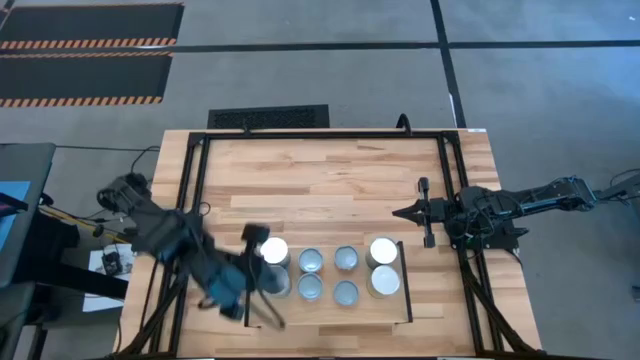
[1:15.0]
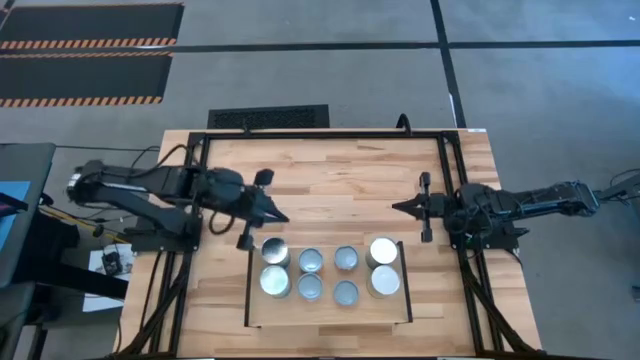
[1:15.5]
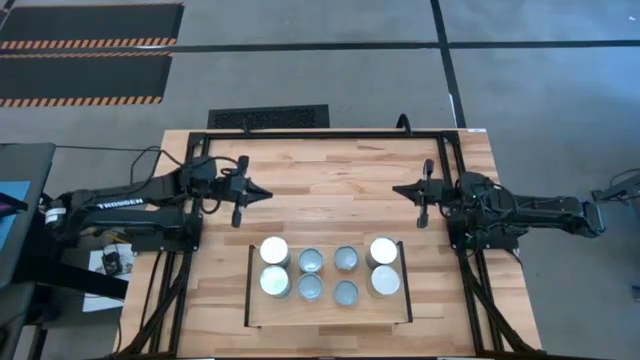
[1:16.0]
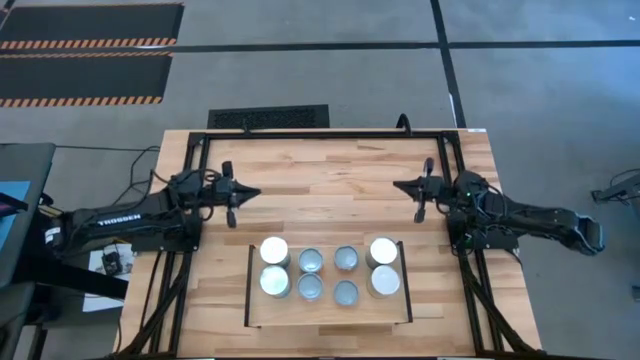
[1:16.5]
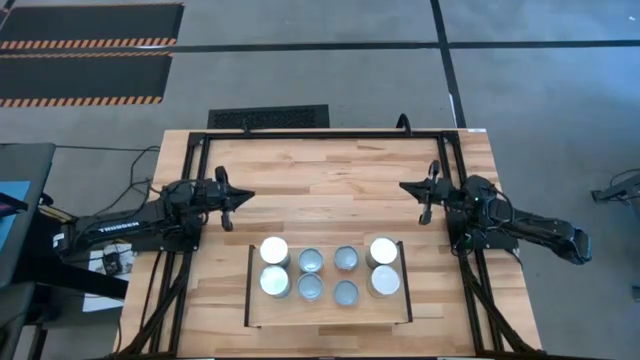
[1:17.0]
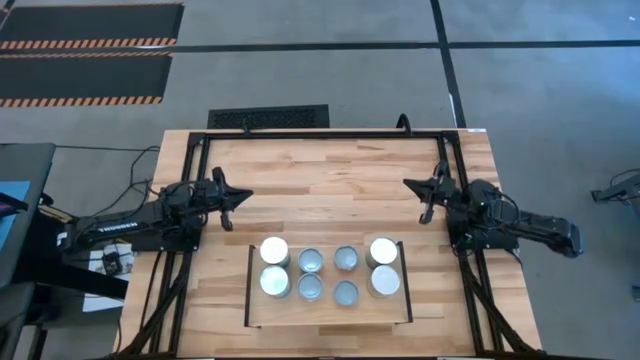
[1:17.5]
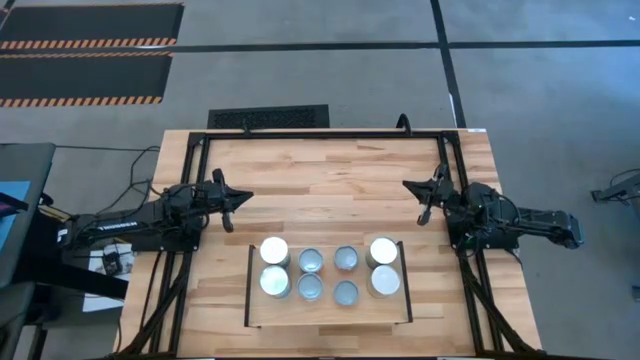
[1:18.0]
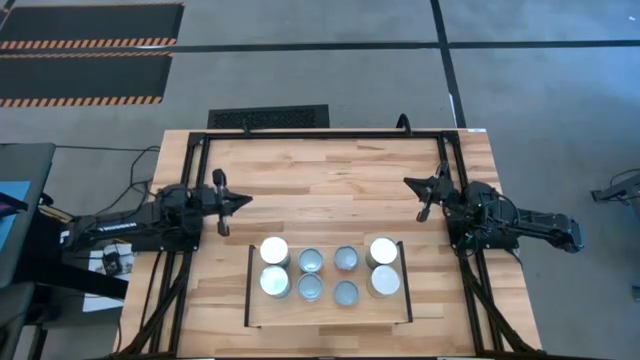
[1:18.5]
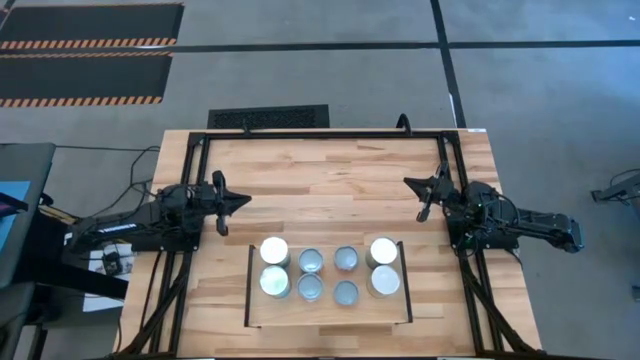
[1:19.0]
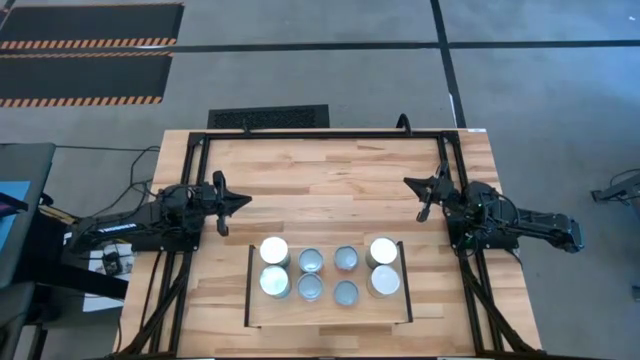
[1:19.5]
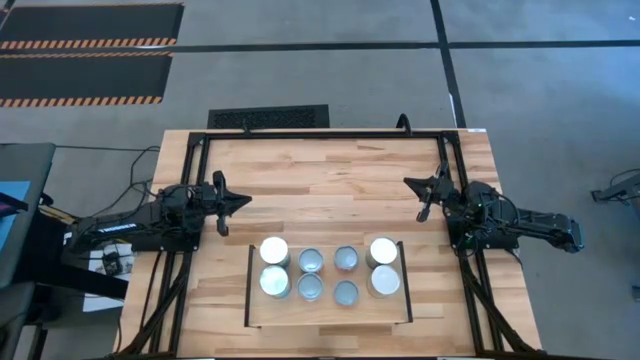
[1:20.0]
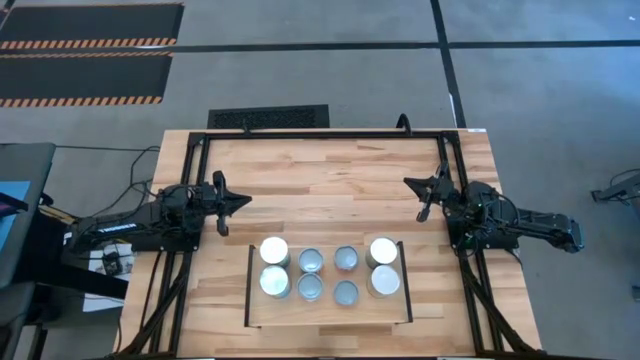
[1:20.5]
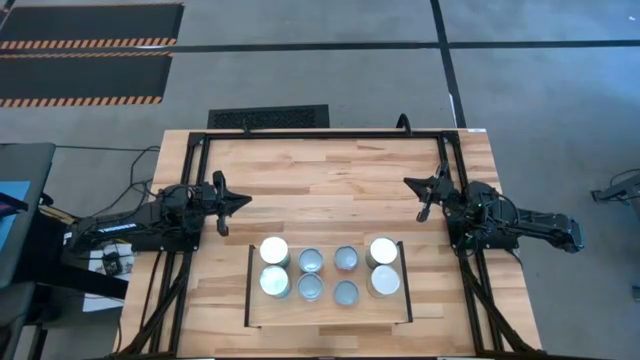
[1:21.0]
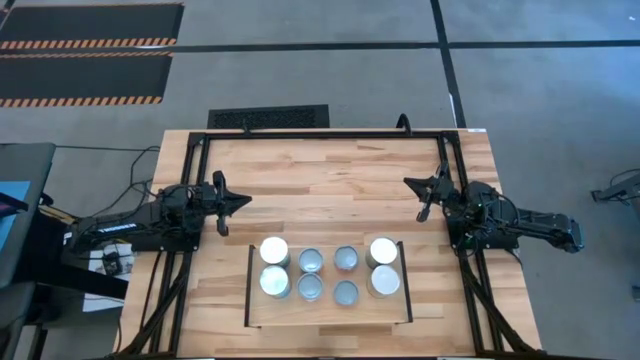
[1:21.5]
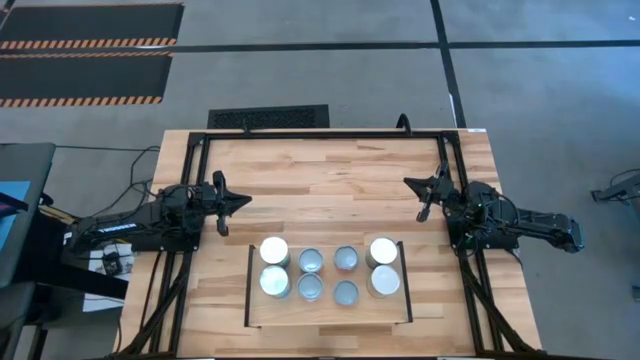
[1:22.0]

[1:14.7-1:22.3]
Task: Pick and place cans onto a shelf
Return to Home Position

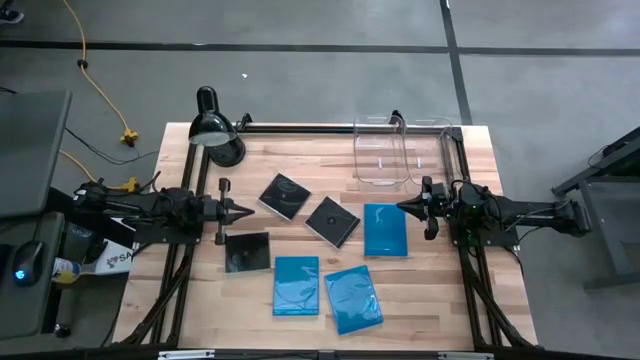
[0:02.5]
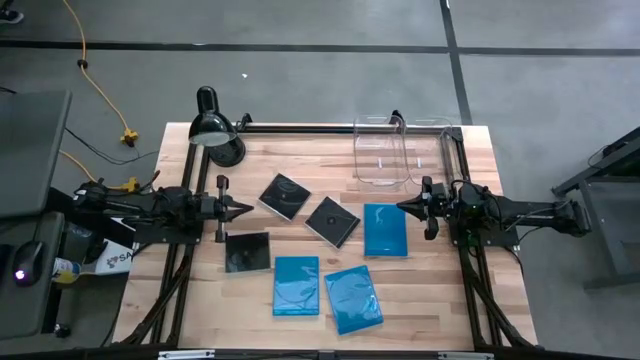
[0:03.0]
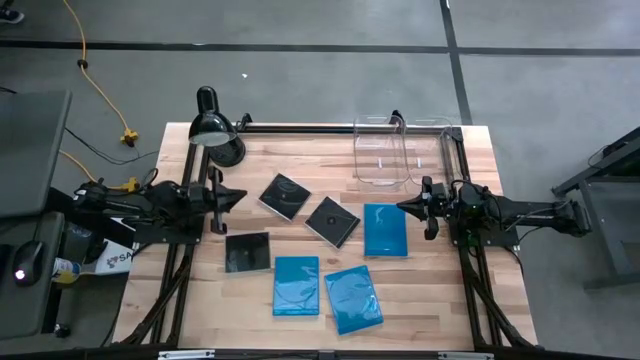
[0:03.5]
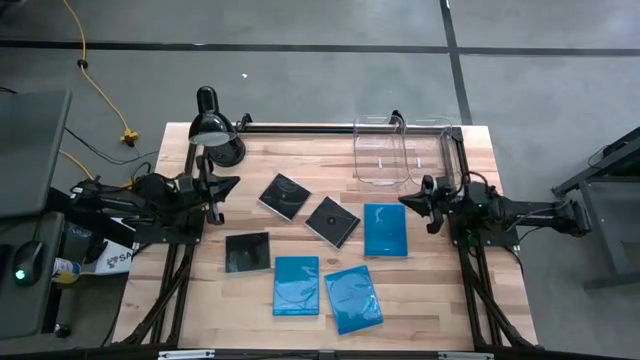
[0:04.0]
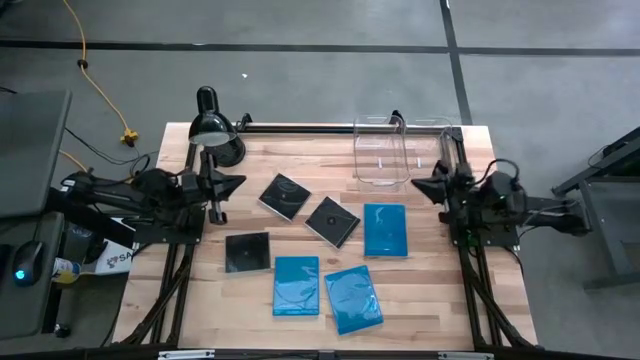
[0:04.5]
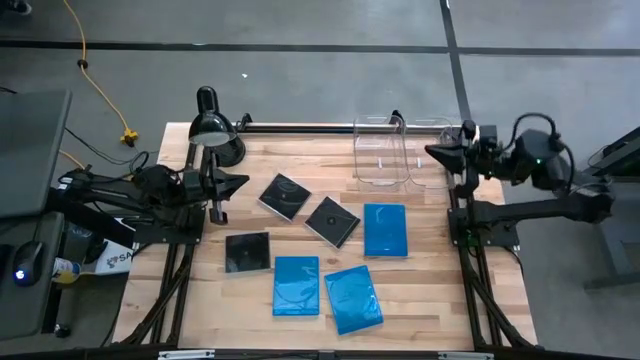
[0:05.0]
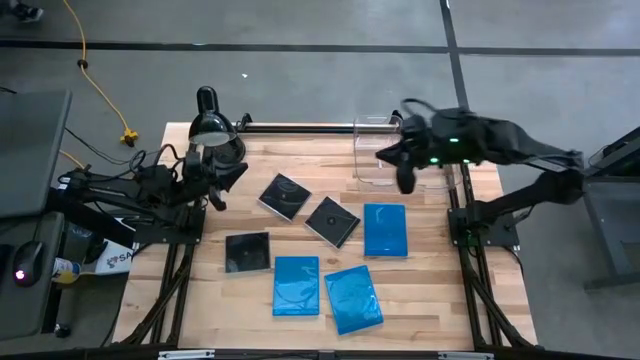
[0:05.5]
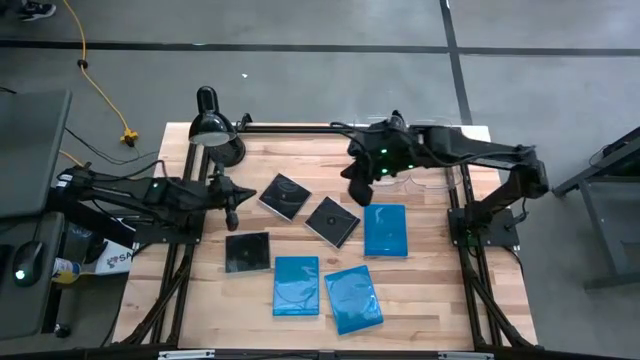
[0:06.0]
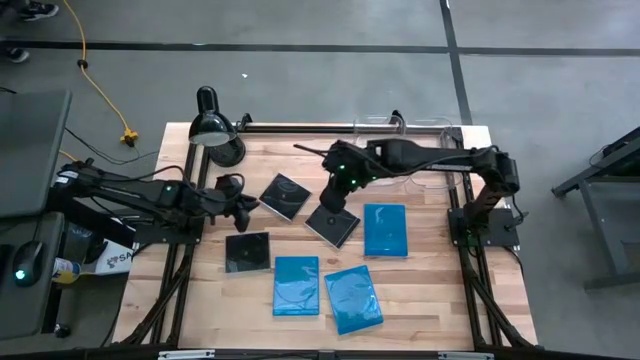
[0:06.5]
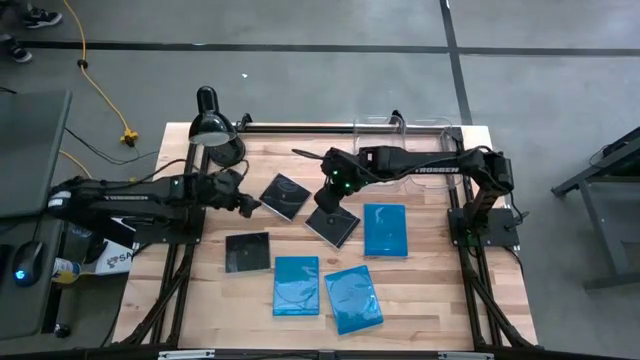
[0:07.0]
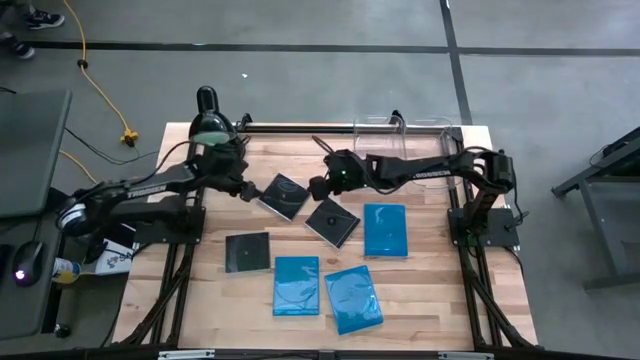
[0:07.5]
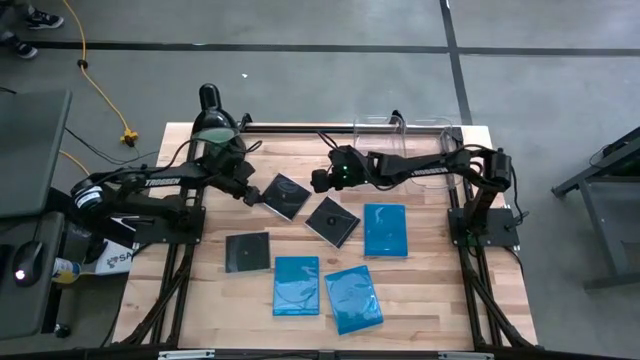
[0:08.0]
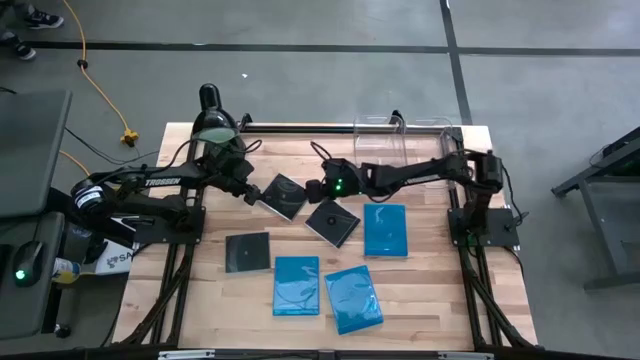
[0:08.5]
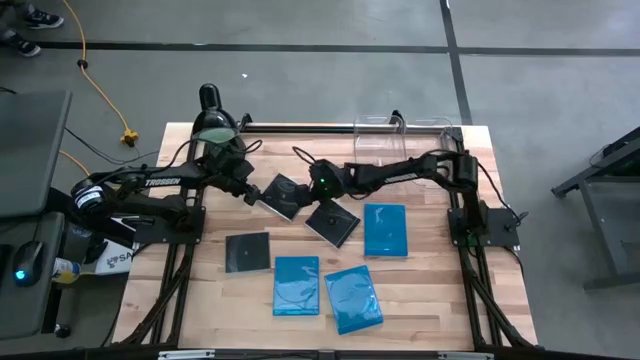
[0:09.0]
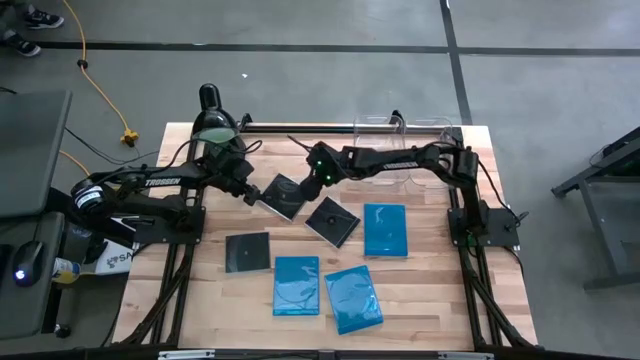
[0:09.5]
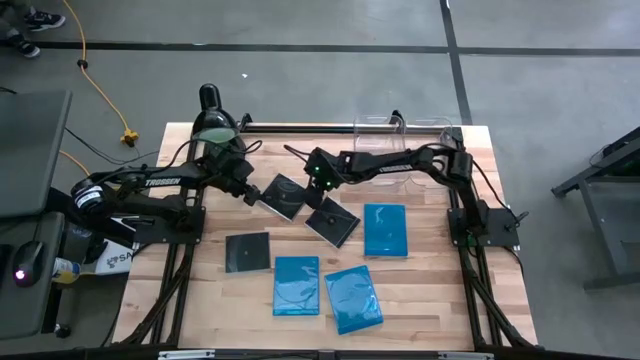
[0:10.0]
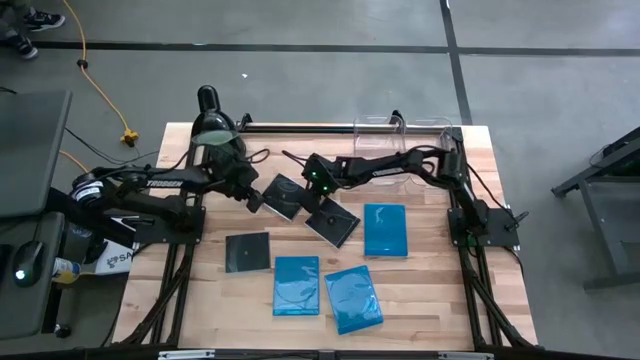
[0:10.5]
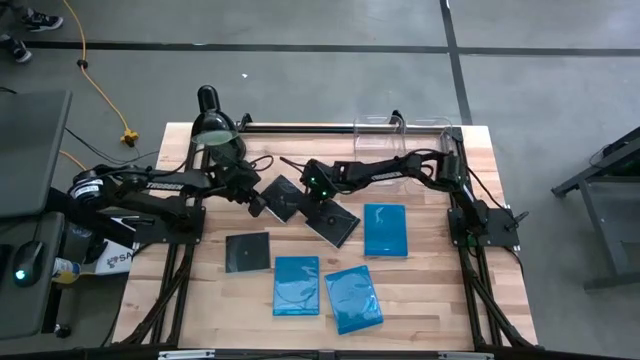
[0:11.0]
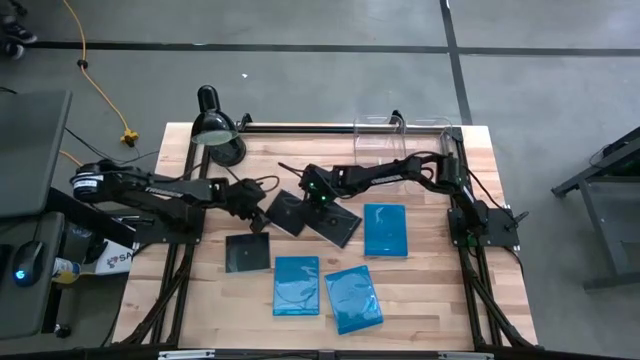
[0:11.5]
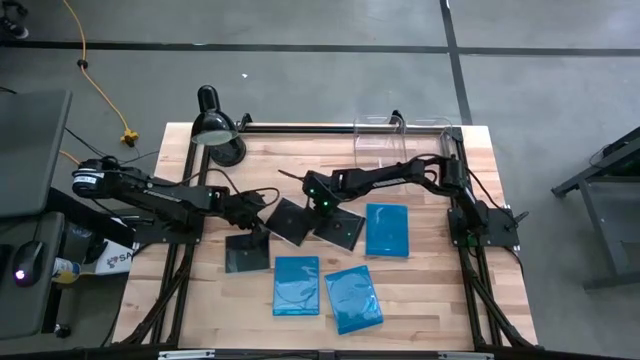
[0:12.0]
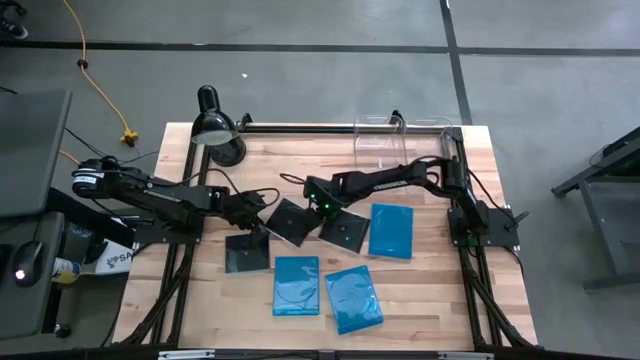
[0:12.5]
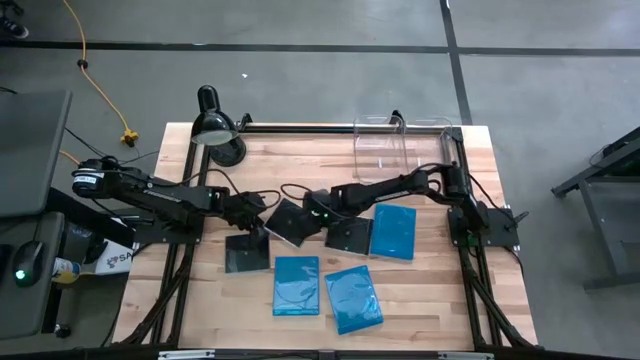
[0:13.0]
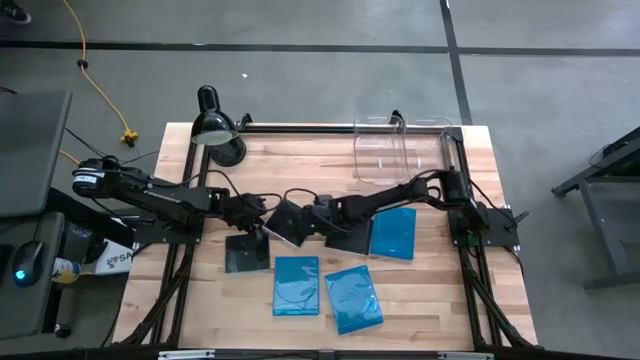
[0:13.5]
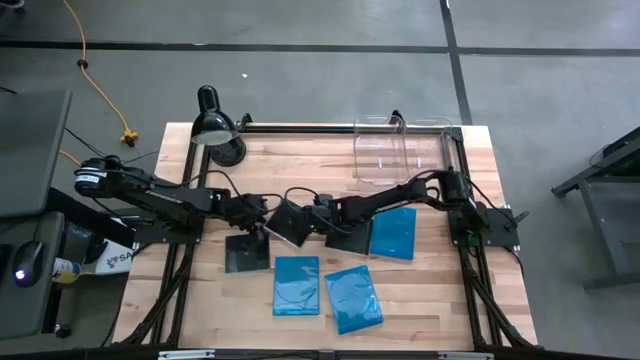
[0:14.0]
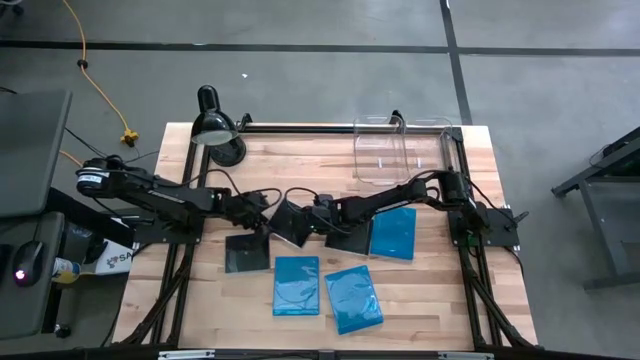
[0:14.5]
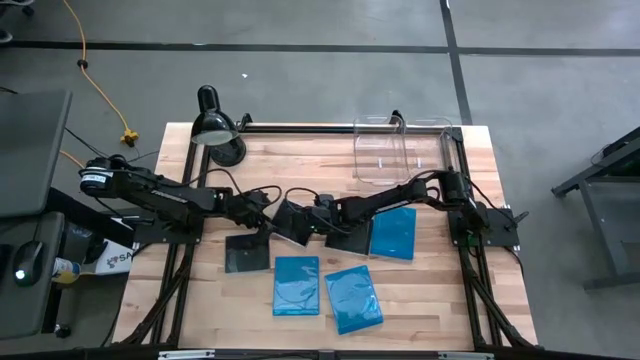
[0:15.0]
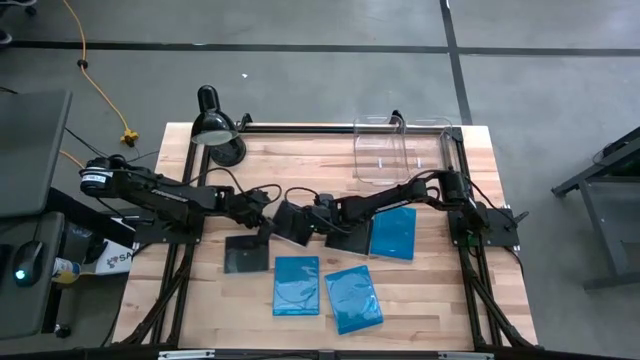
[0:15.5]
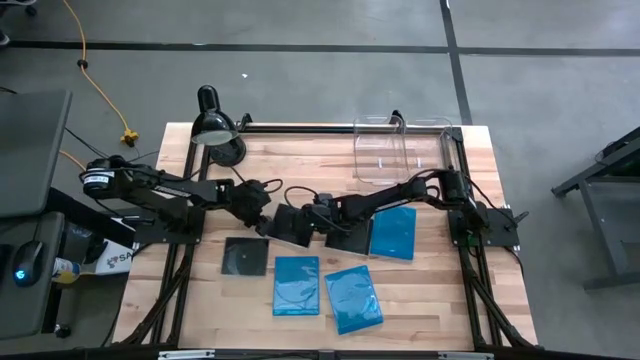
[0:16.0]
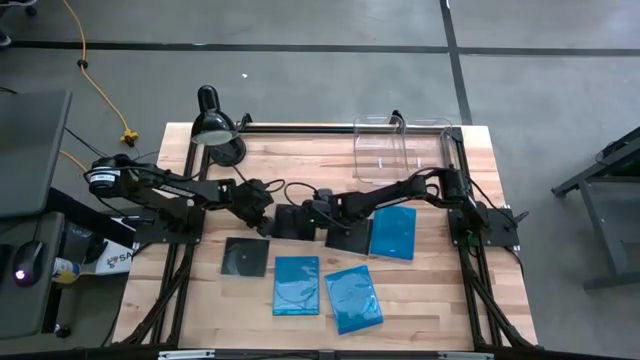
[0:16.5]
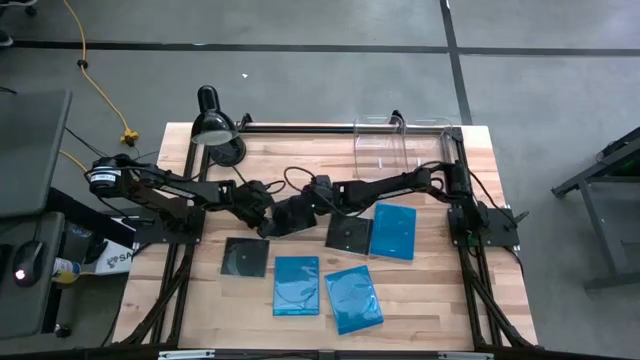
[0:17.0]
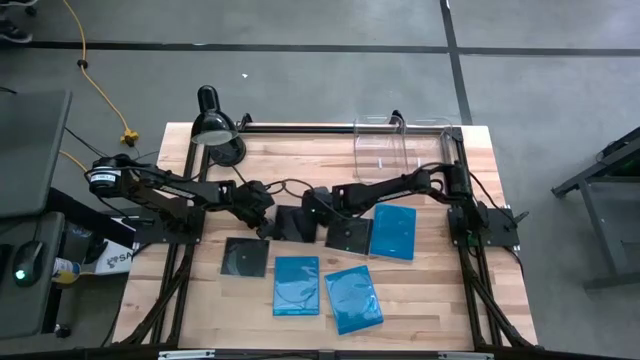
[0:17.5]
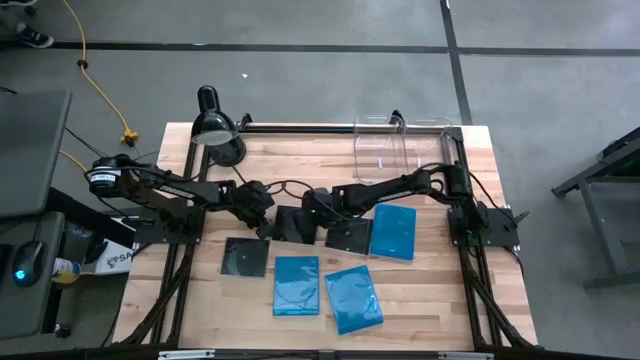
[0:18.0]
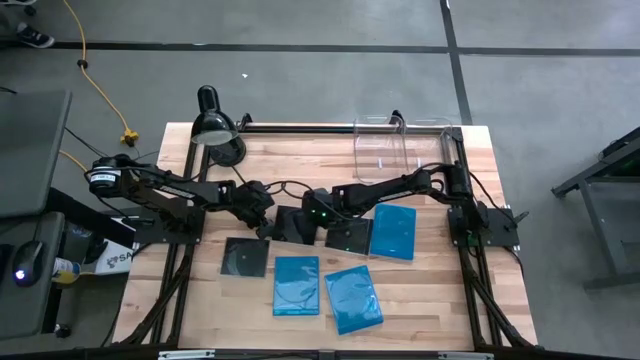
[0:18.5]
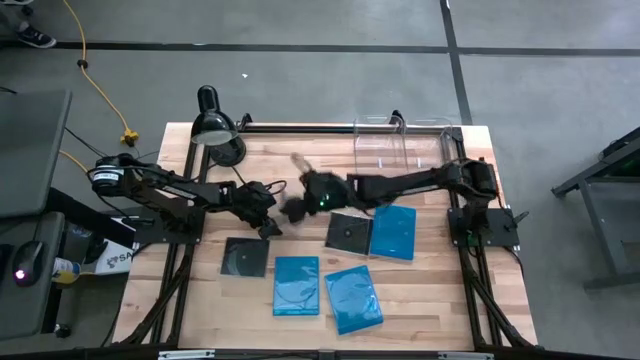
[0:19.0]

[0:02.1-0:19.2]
Task: Pick & place jewel cases by type
Put the top black CD case into the right transparent bin
